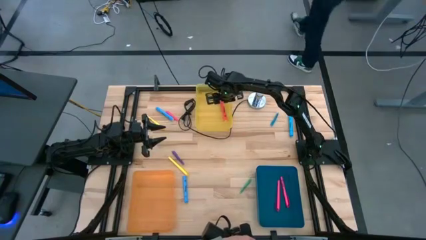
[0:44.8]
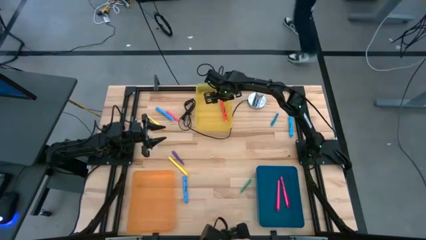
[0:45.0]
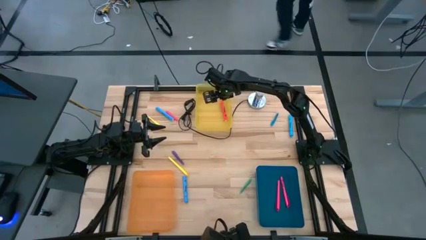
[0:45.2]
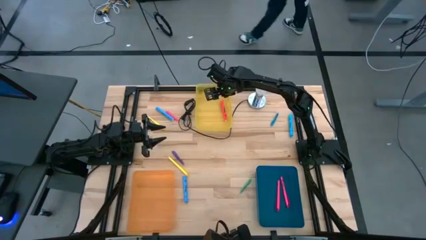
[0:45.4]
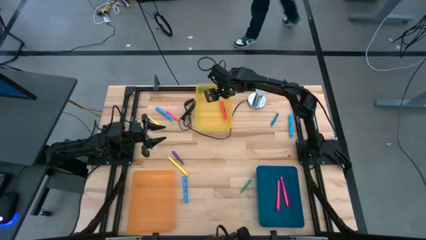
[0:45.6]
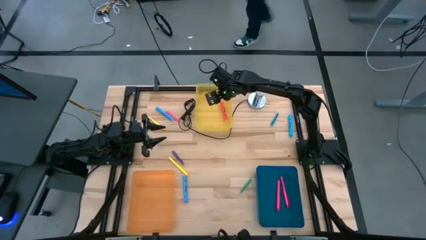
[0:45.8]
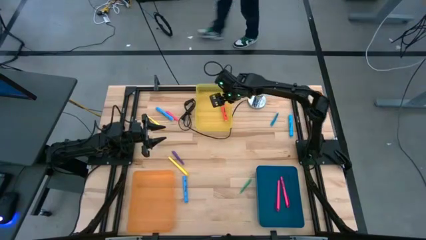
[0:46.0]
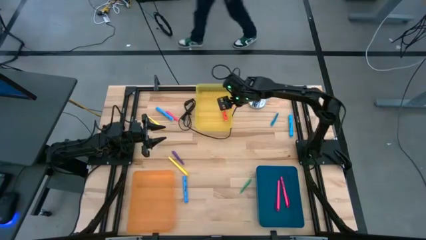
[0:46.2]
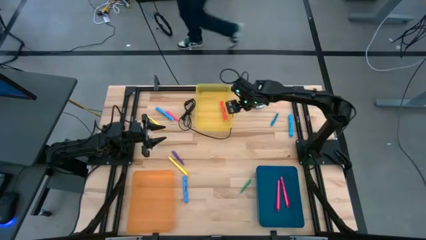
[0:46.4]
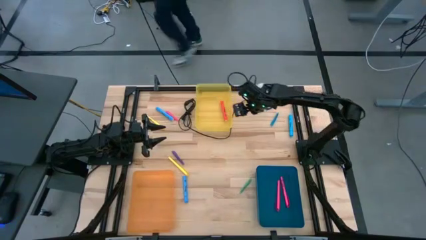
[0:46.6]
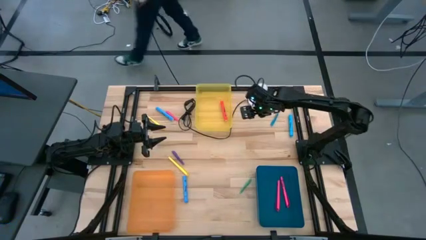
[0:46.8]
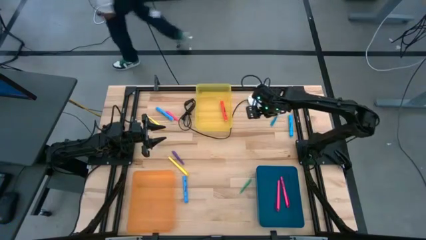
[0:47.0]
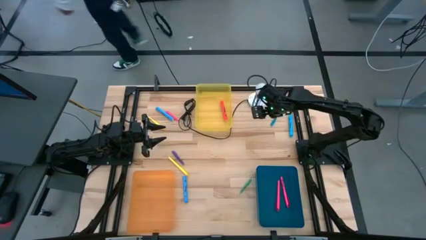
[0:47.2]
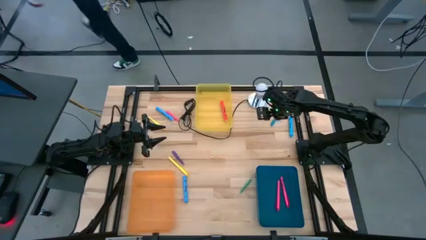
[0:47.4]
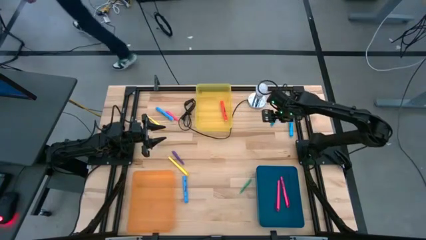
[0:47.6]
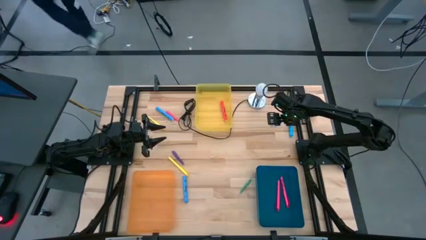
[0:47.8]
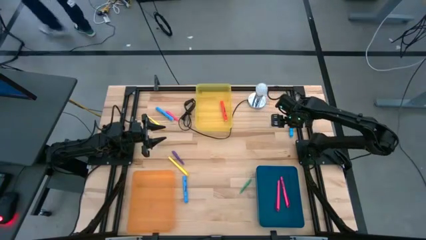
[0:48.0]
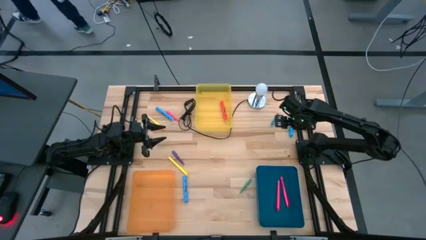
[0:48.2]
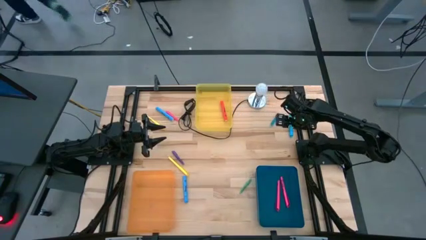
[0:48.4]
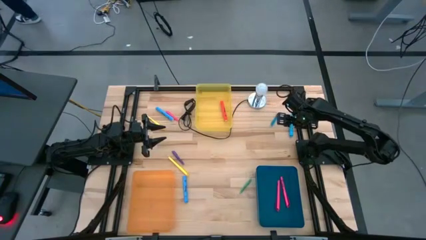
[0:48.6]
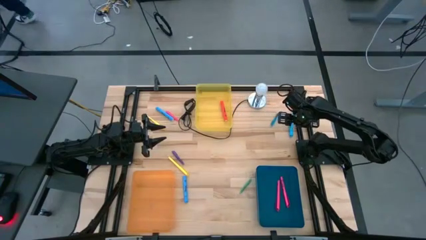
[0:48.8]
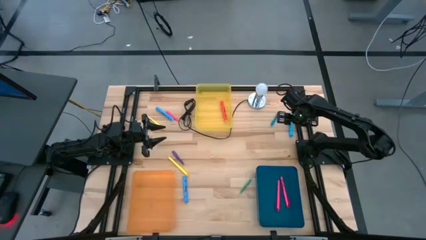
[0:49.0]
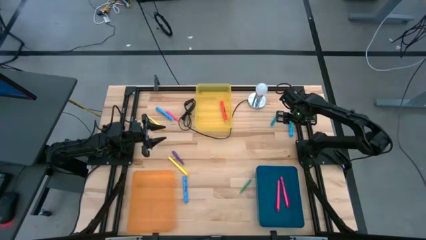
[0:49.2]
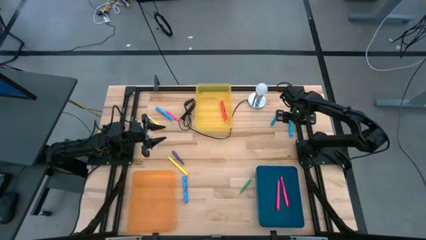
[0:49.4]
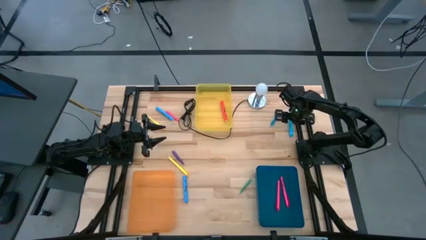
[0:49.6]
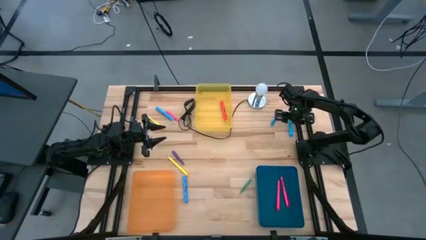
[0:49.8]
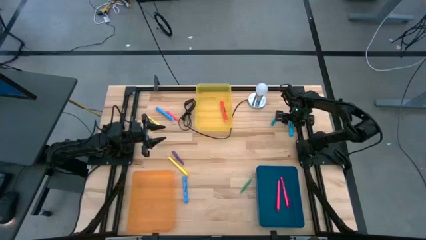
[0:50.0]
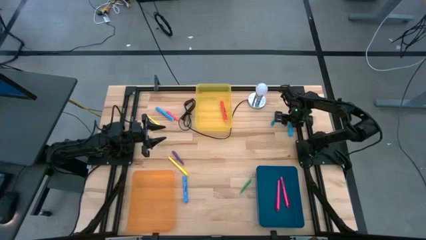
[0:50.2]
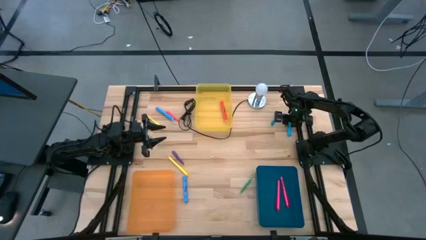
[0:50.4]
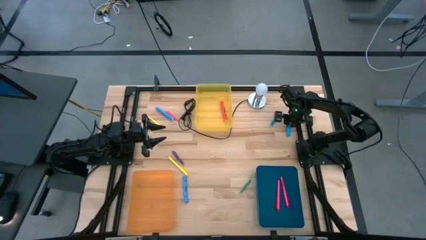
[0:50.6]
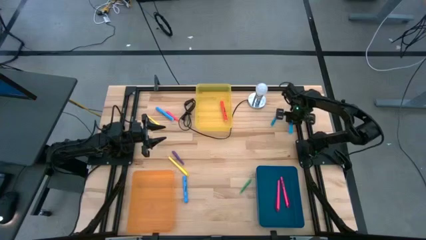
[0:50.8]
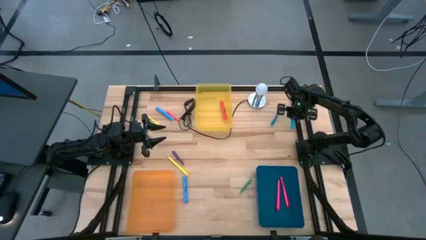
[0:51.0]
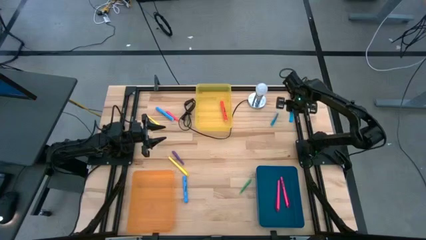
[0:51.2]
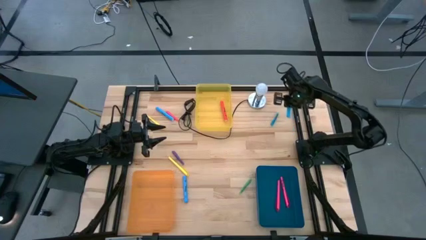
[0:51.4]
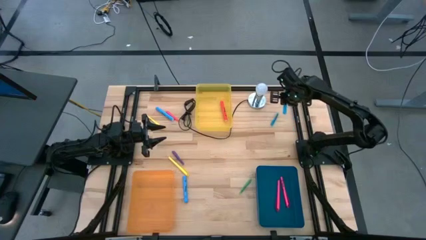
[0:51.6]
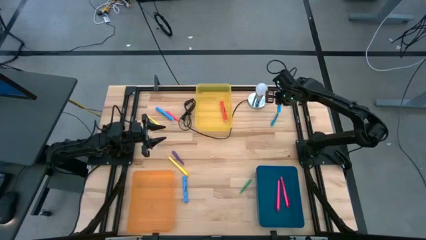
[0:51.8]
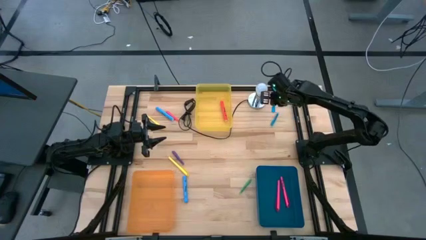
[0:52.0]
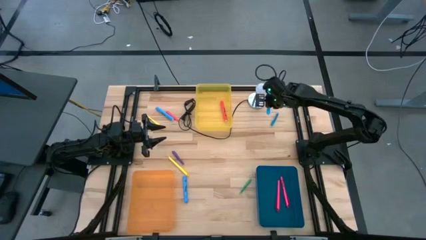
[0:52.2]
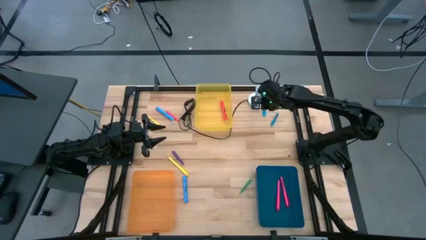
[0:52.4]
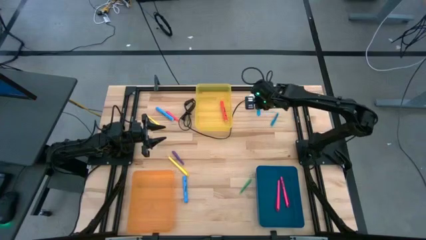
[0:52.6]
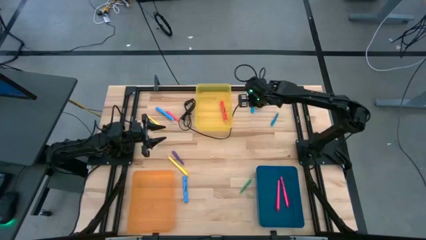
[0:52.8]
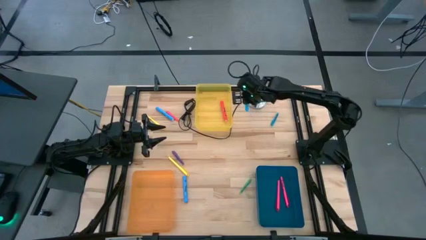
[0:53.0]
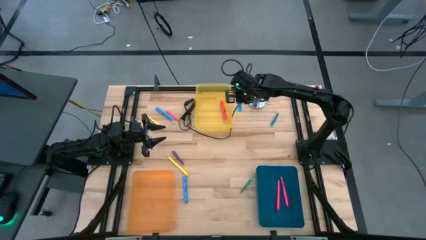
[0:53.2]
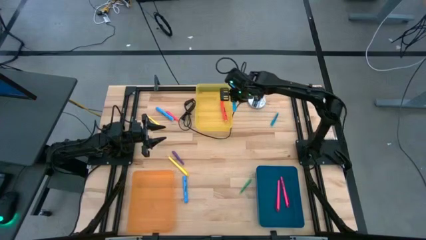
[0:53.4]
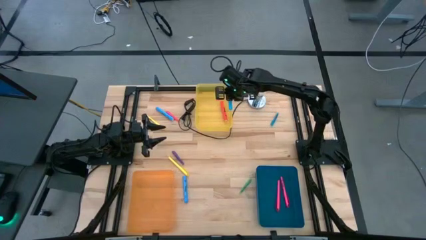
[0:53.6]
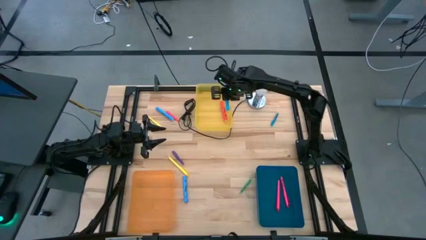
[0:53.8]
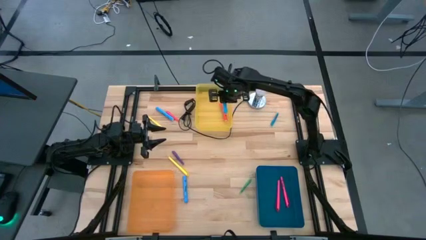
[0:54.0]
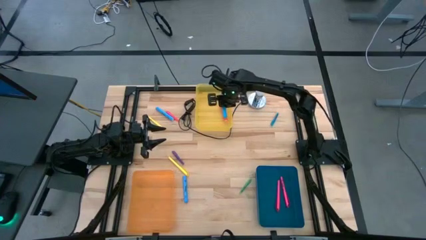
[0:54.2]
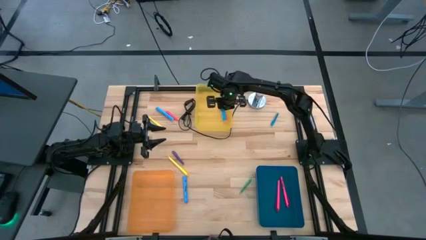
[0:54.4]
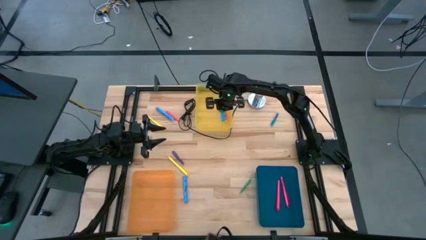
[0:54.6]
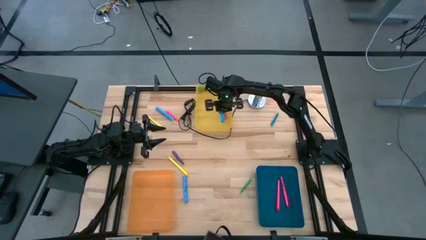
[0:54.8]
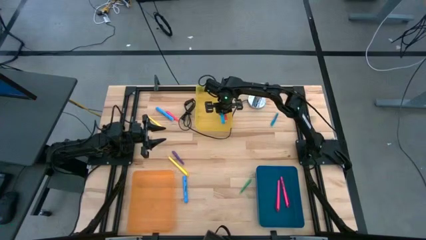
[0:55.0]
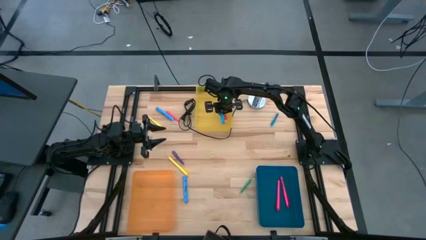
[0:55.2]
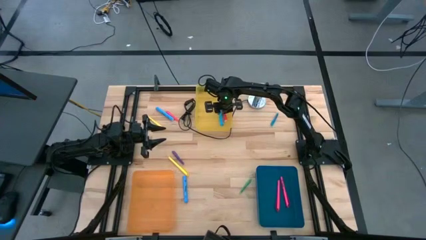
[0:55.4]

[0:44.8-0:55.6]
Task: Pick & Place Markers
Put the right big blue highlighter into the yellow bin

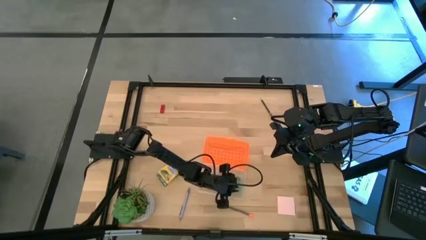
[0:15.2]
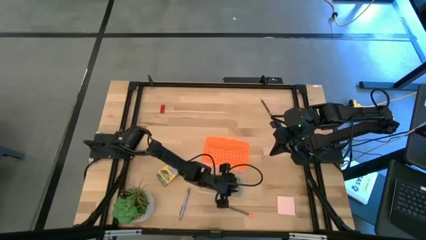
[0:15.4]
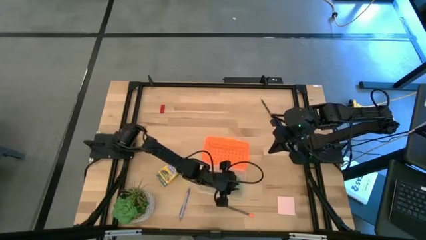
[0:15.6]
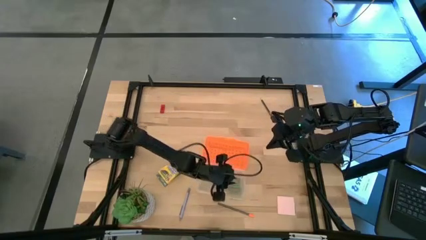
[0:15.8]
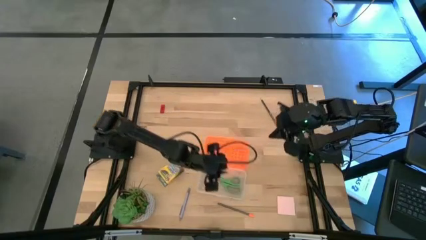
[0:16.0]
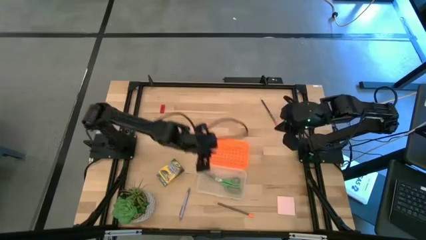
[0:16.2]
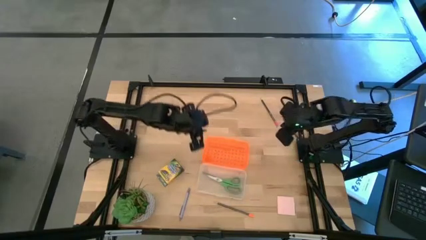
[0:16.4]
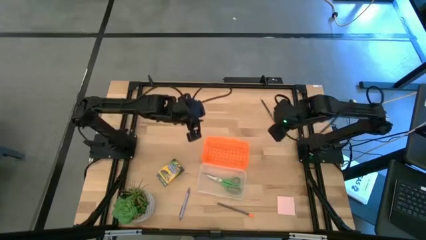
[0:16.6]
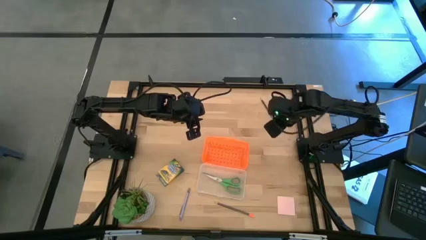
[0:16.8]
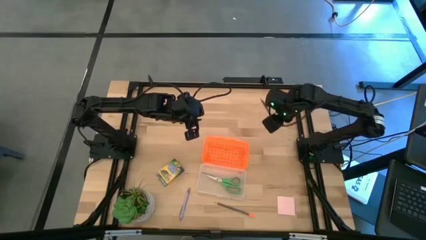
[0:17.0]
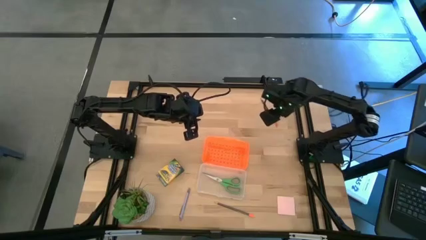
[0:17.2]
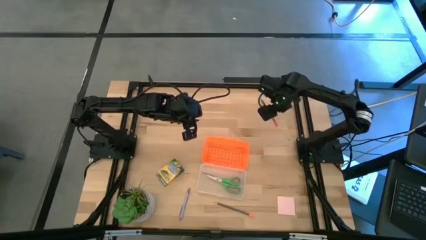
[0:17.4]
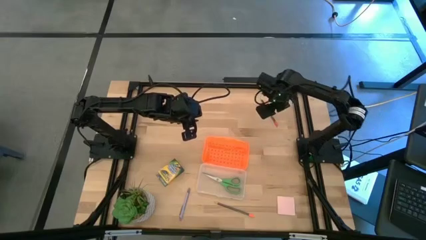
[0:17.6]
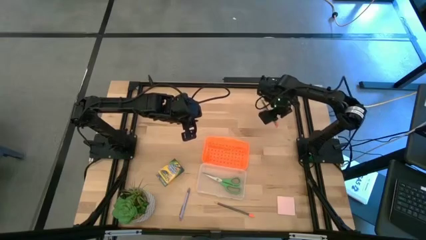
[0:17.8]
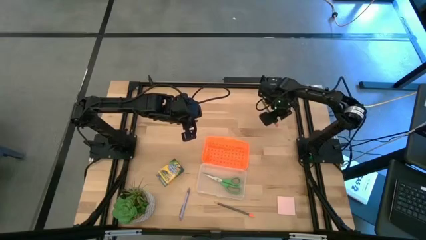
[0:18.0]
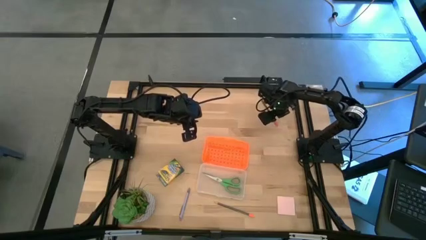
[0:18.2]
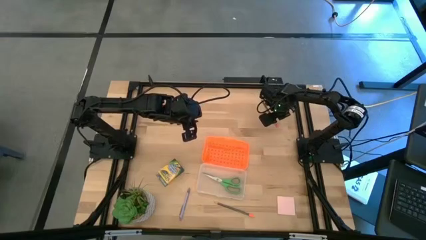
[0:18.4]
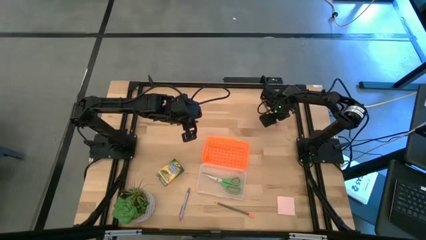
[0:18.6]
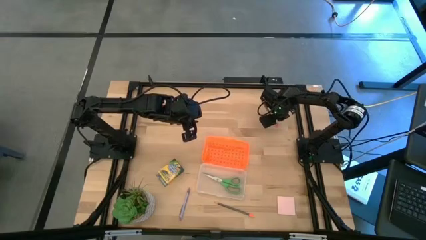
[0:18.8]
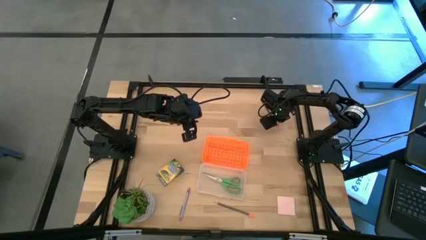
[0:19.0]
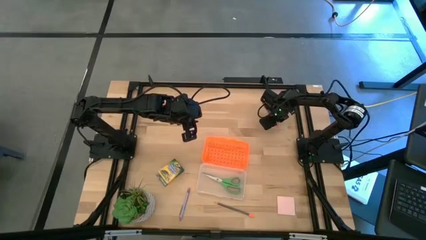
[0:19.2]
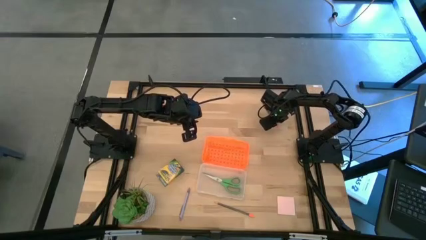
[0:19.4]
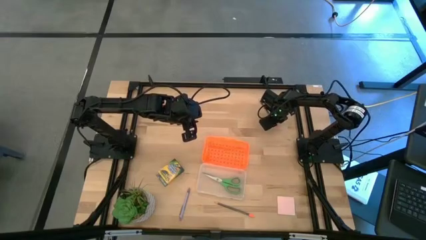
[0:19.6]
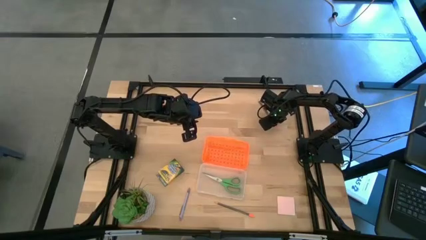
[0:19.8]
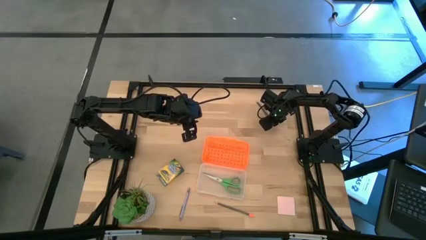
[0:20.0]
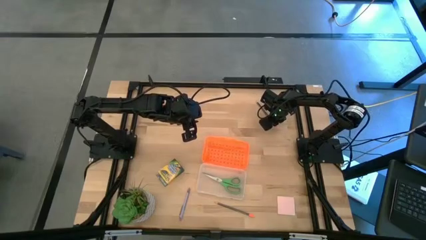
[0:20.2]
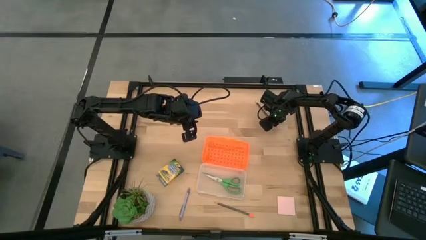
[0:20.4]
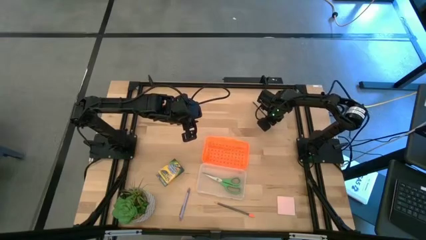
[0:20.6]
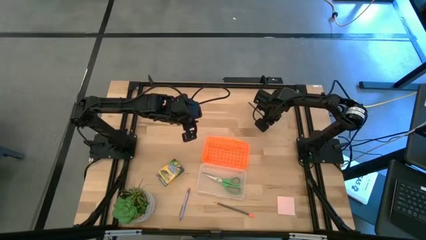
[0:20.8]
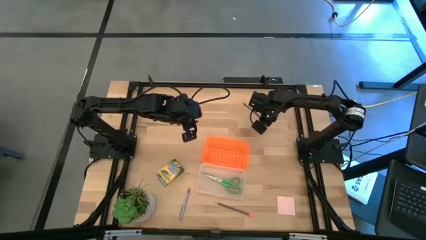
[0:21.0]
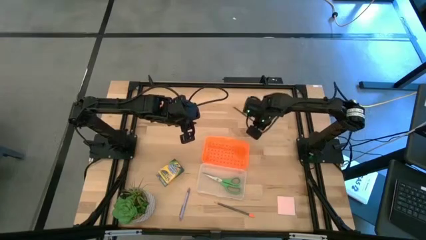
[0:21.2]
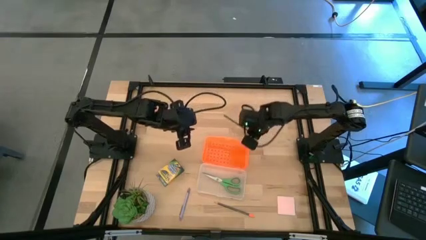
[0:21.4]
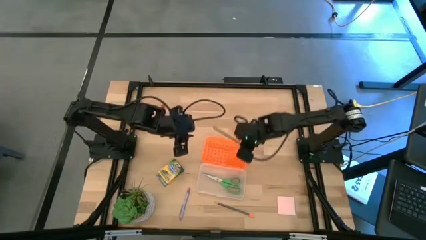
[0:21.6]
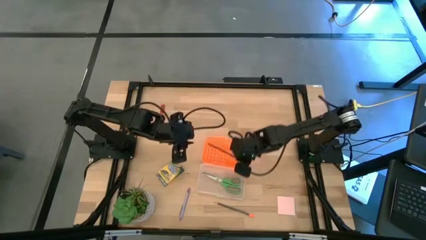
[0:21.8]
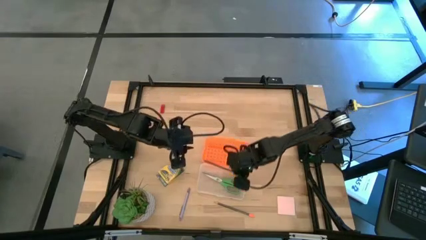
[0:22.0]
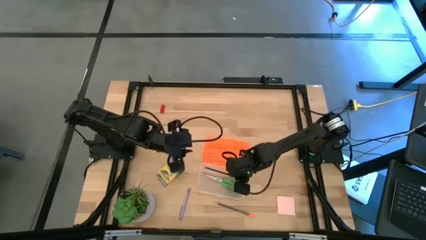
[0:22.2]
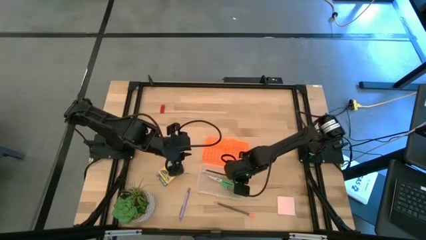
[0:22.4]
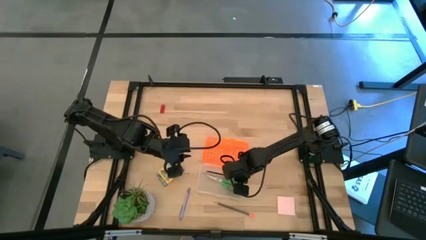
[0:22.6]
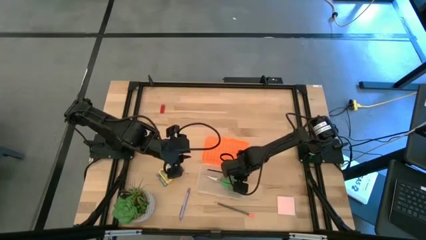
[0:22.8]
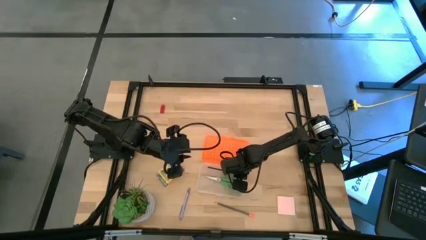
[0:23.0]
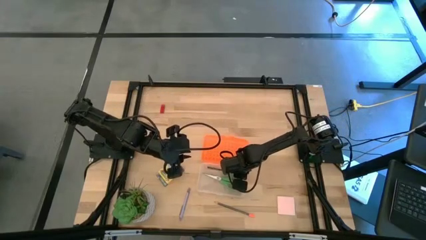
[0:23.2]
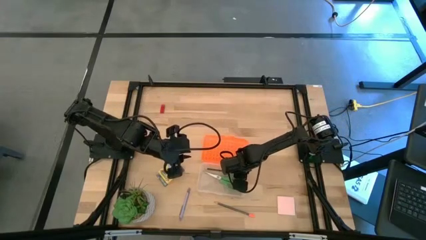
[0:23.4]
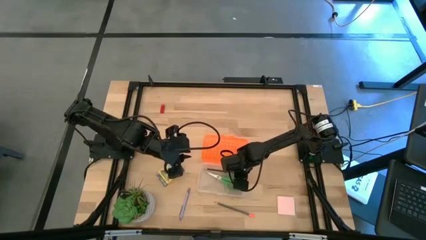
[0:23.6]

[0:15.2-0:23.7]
Task: Pack school essentials
Put the top black pencil into the orange supply box
